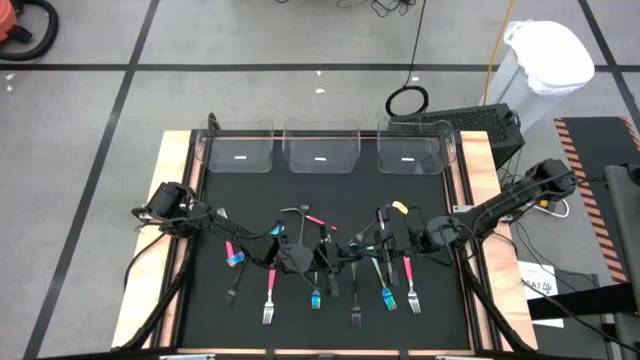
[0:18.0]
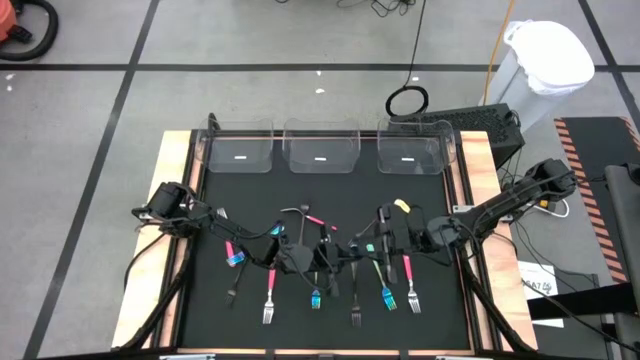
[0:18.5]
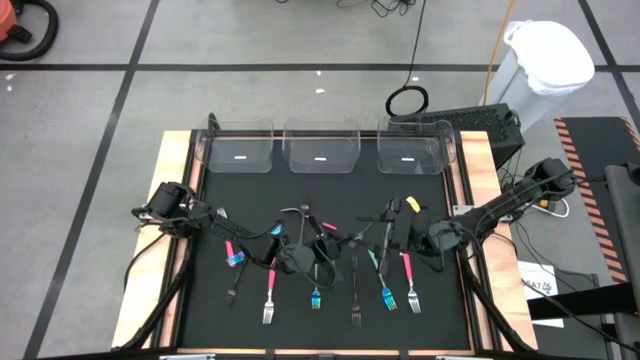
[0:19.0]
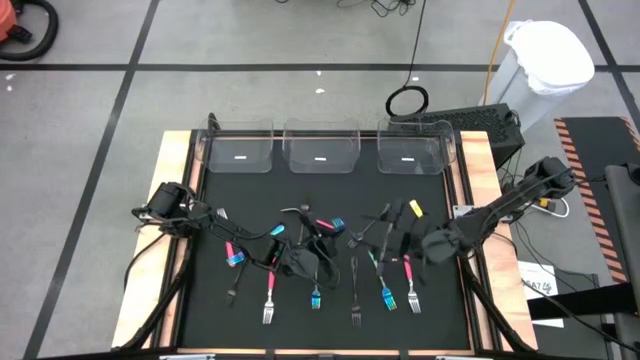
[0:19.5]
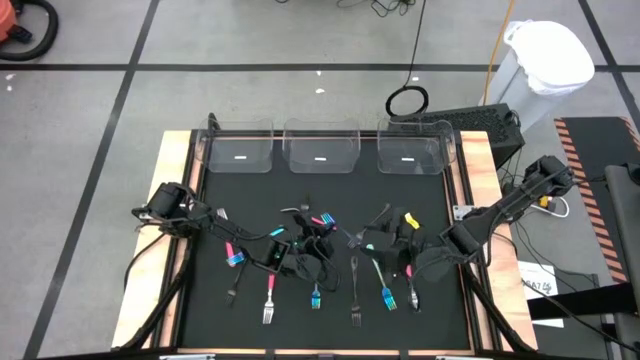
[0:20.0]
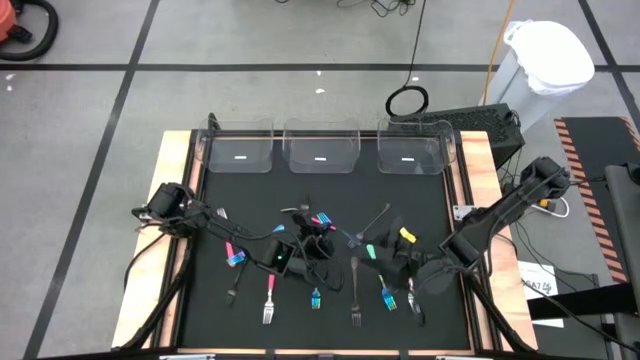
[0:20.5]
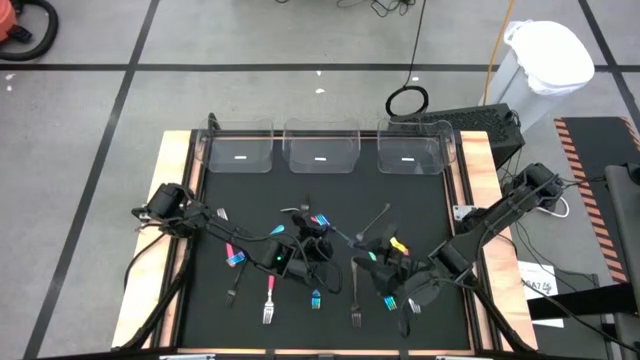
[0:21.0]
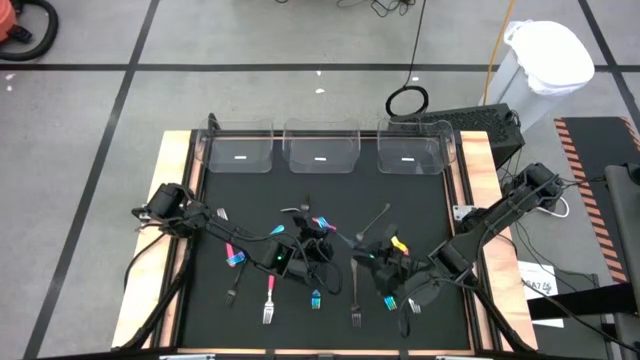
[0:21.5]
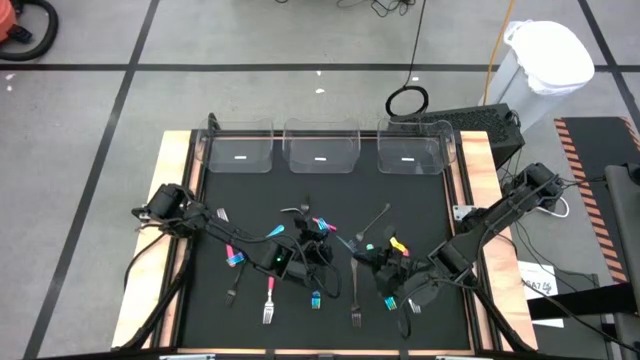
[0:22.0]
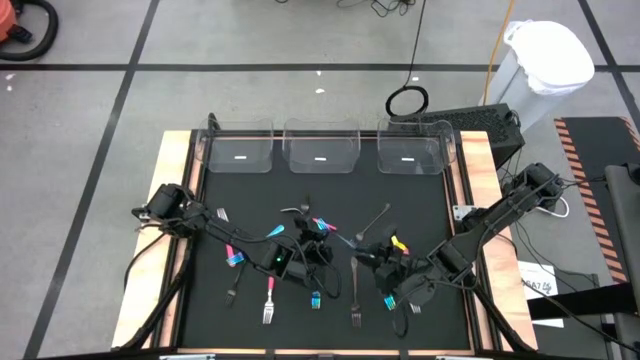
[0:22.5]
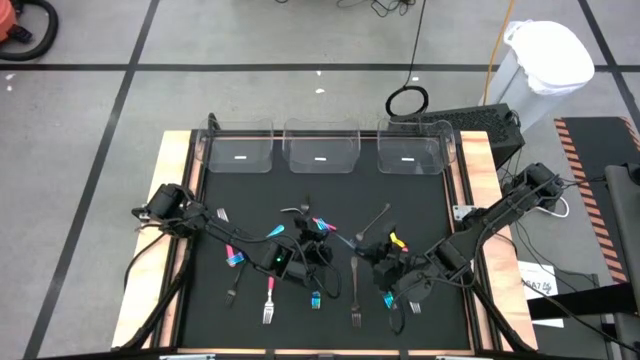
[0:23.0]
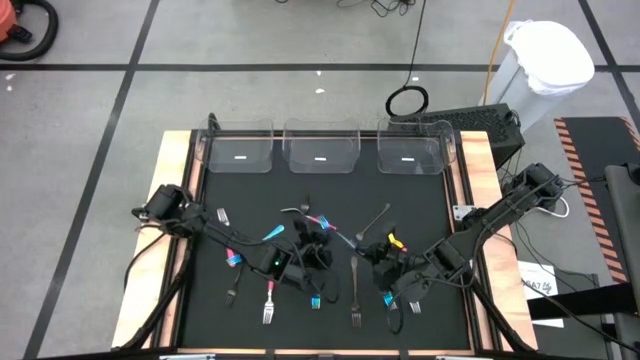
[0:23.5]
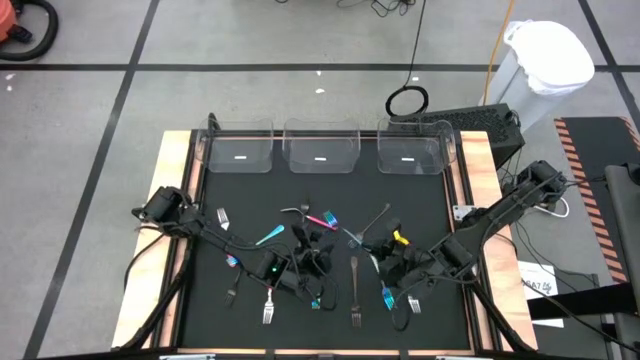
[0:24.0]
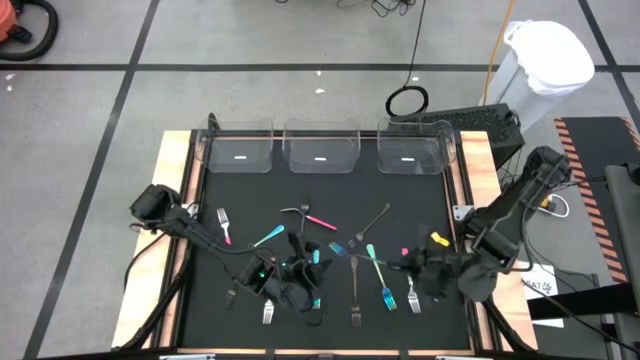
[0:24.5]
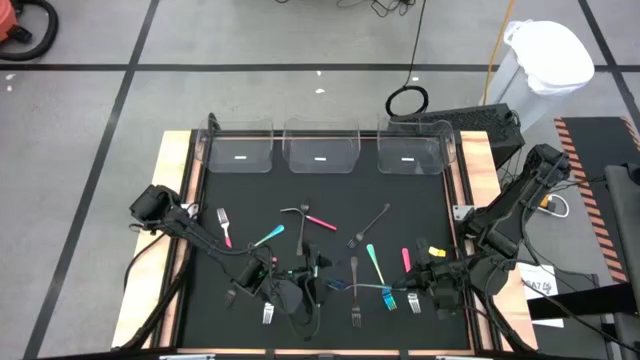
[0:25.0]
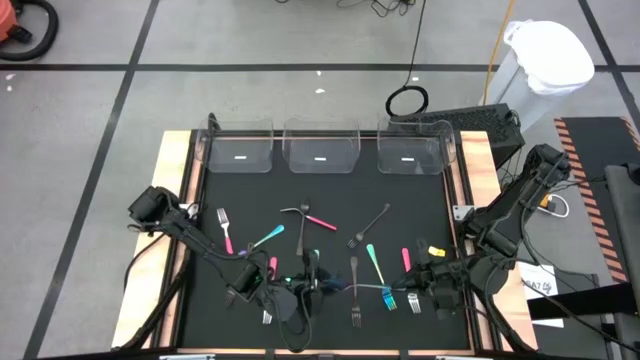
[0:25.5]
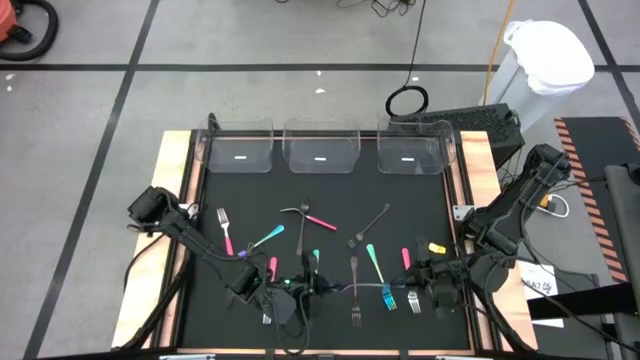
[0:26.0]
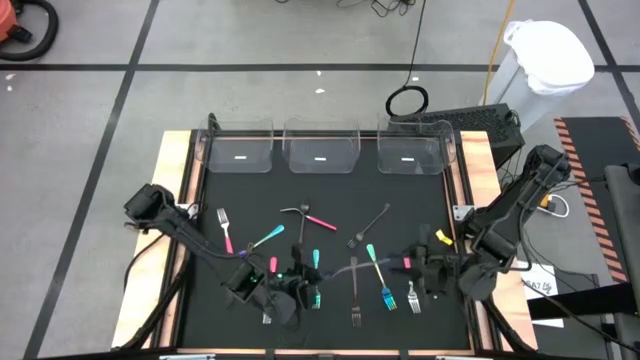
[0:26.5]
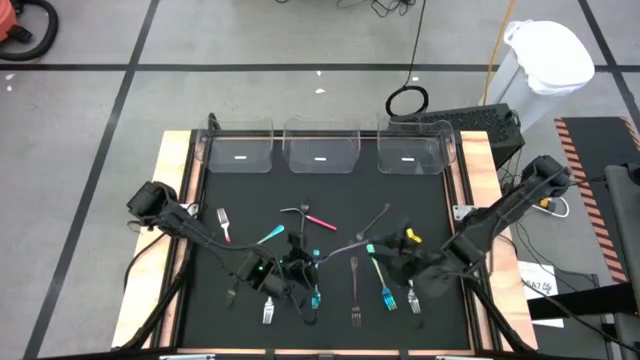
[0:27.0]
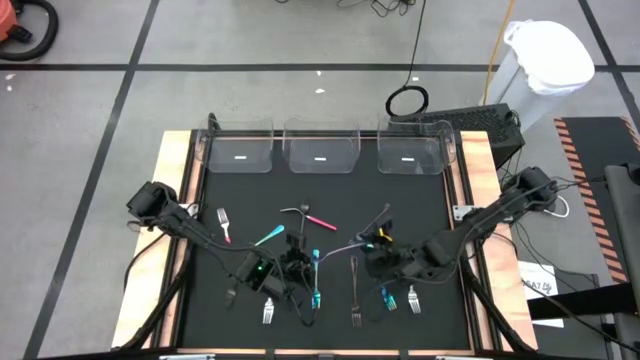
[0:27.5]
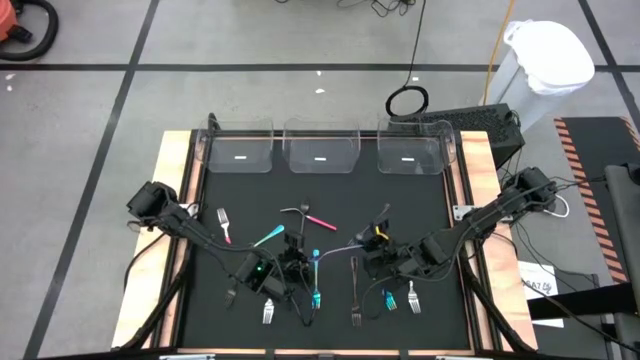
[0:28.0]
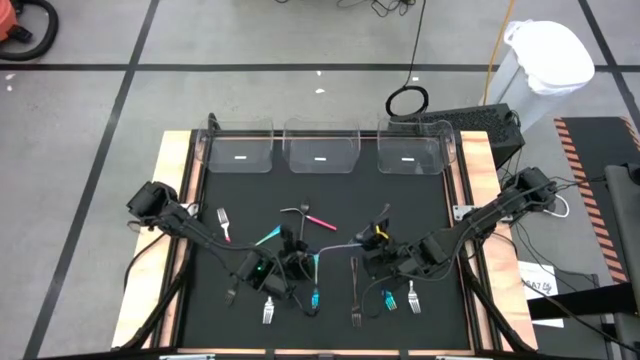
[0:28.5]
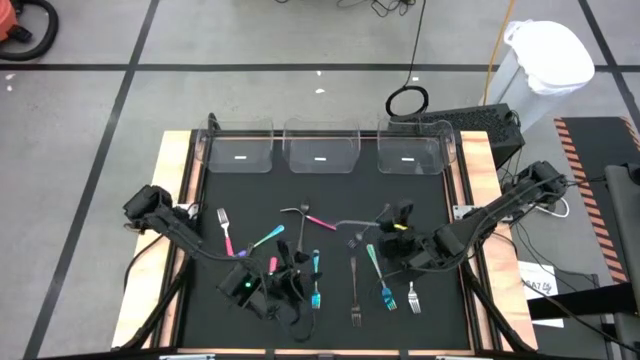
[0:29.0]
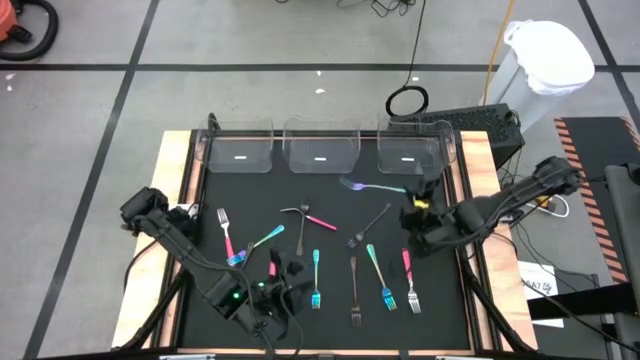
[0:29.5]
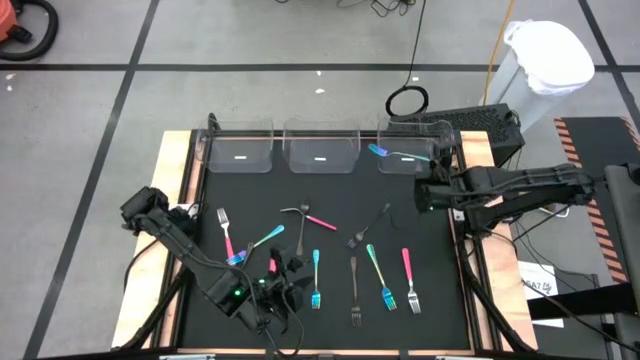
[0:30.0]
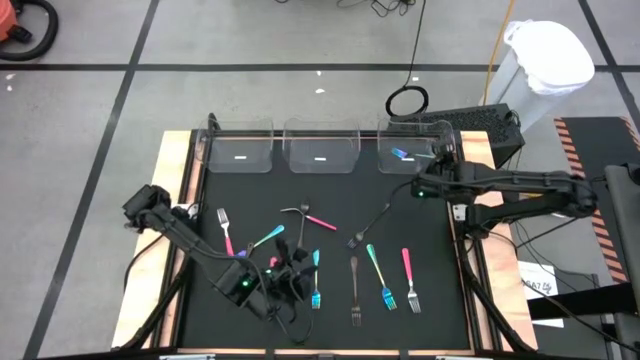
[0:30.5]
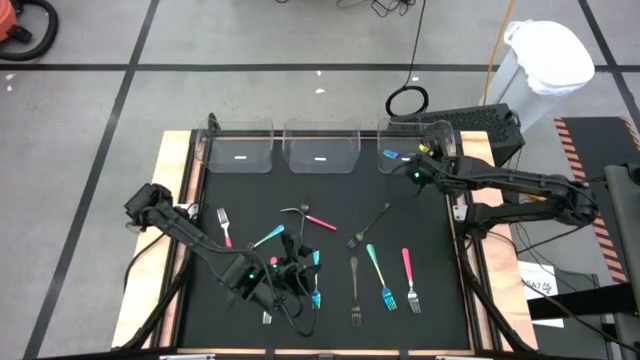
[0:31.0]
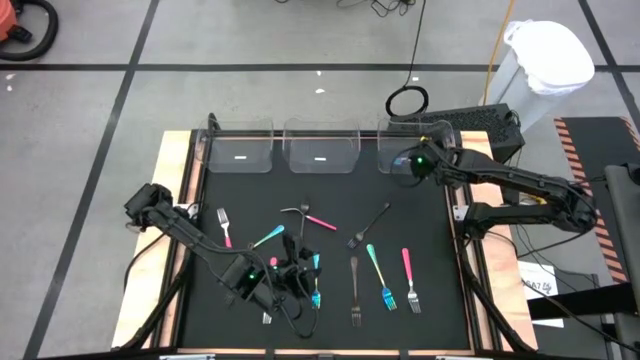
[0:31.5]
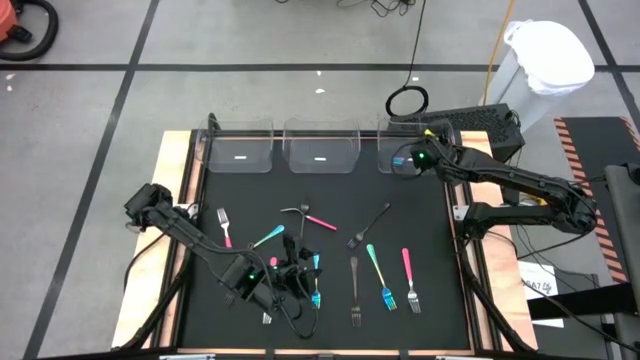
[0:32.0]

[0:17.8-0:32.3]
Task: Sort silverware by color (type)
Put the blue fork into the right transparent bin

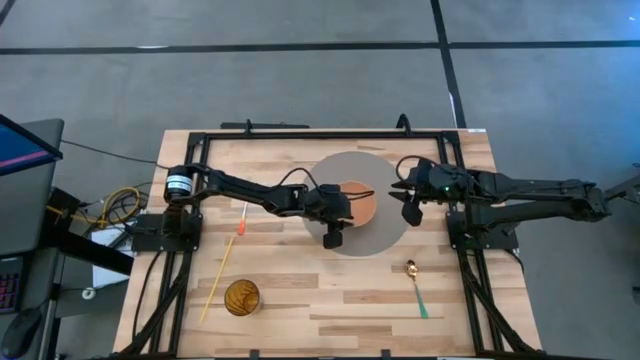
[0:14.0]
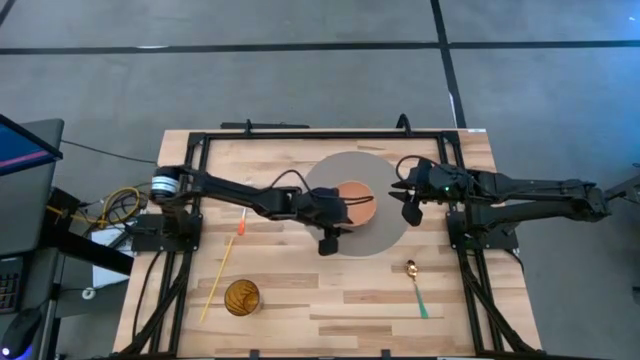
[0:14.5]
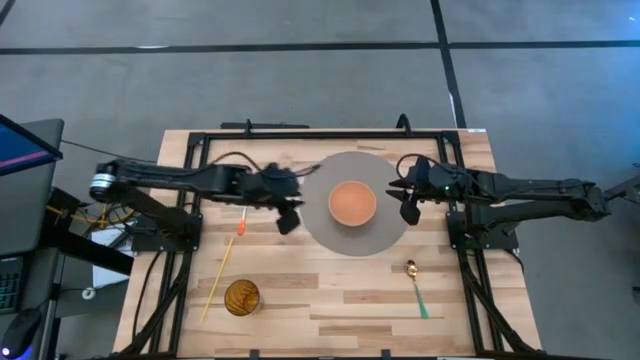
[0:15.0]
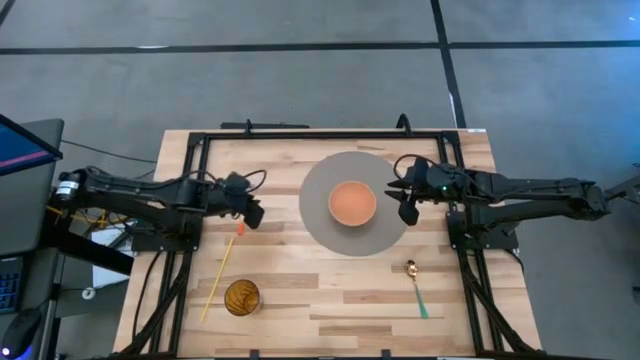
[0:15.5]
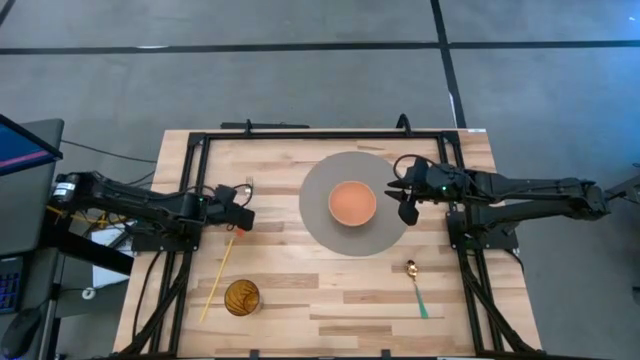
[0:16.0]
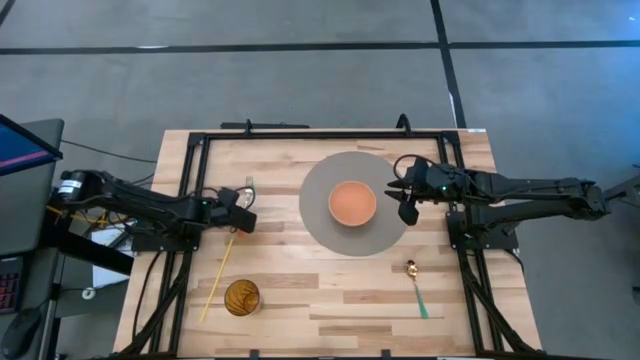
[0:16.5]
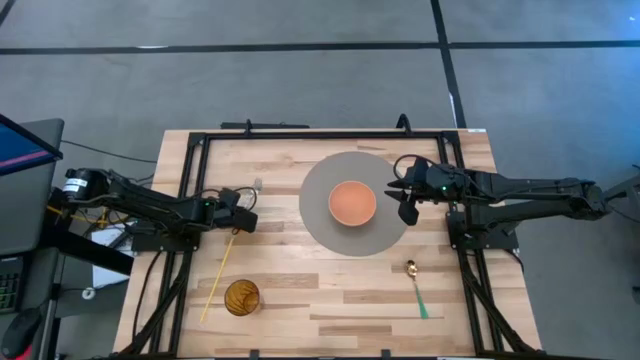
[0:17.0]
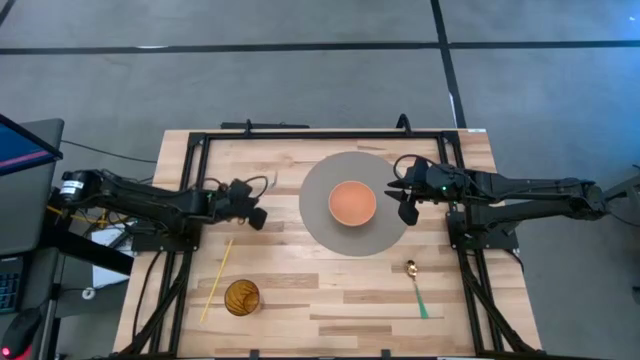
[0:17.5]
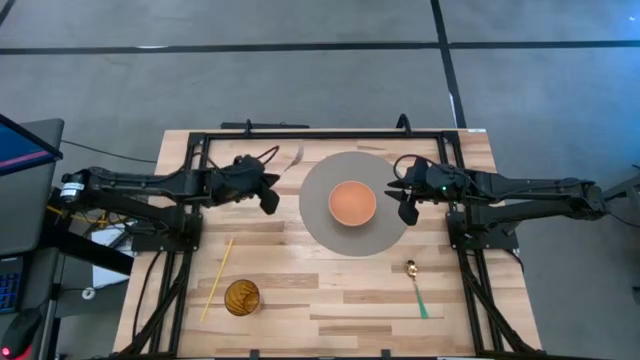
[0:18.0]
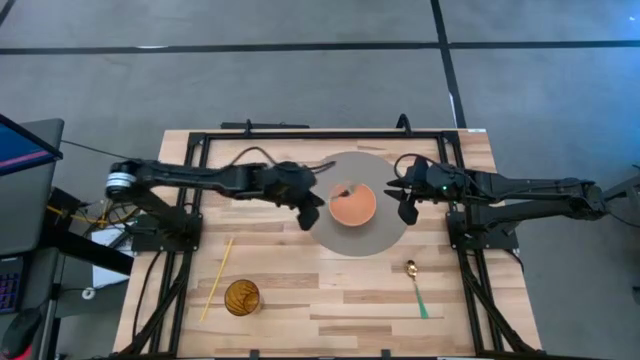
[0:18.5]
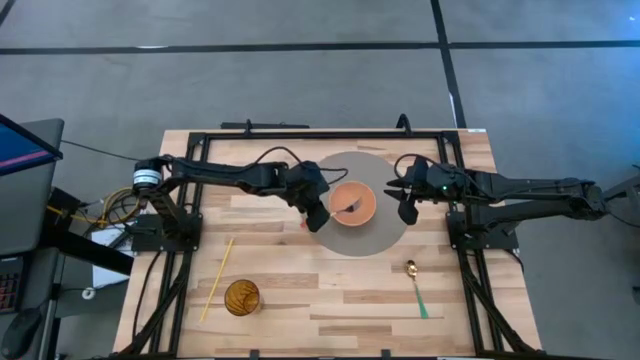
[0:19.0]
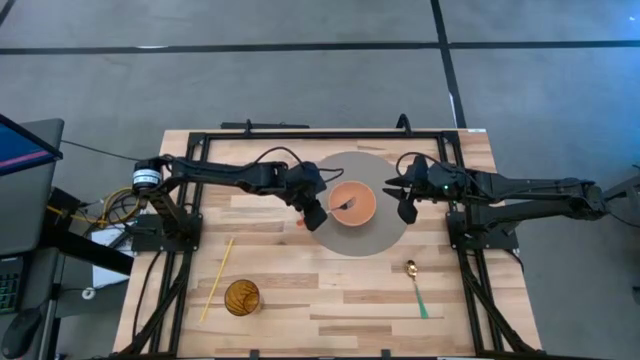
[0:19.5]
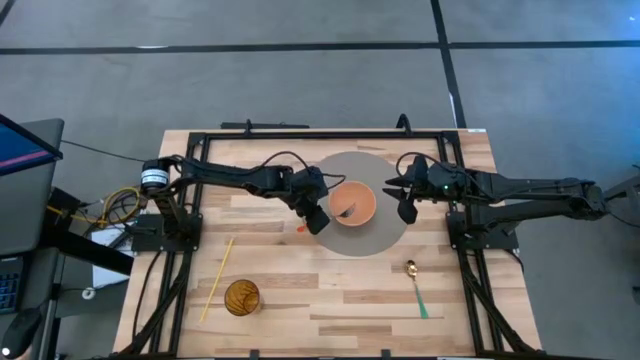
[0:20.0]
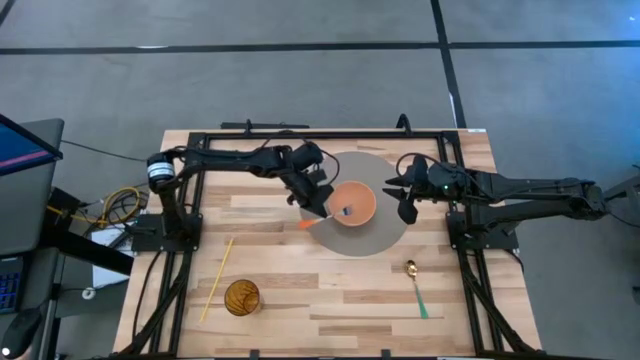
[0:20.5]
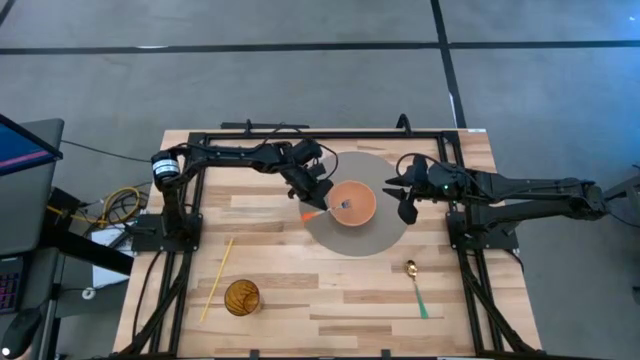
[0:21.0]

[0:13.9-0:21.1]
Task: Pick & Place Utensil
Put the orange fork into the orange bowl
